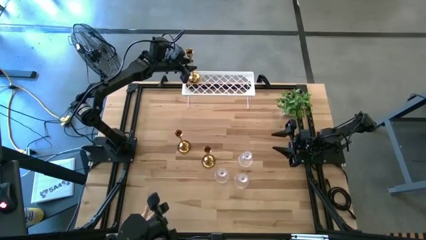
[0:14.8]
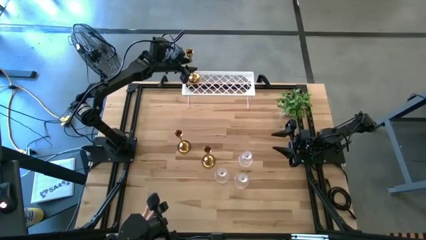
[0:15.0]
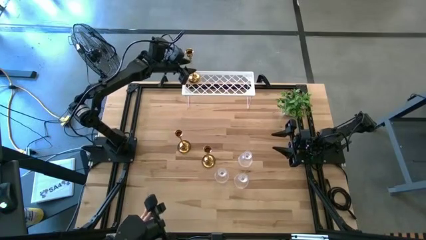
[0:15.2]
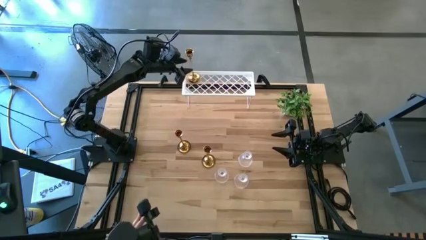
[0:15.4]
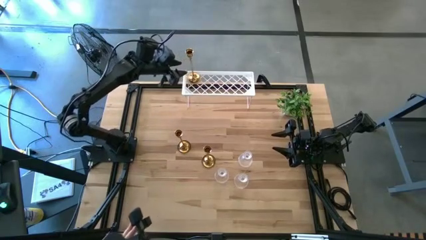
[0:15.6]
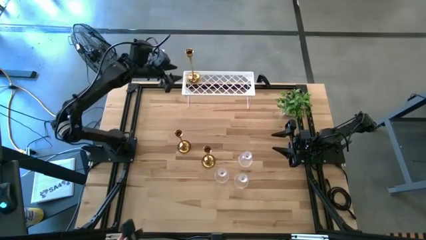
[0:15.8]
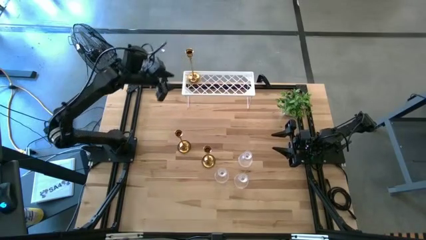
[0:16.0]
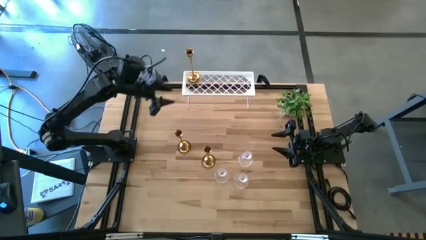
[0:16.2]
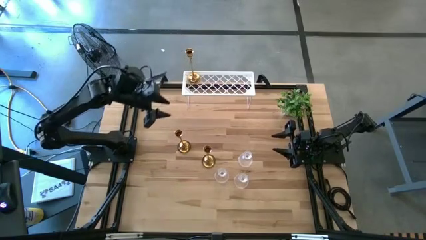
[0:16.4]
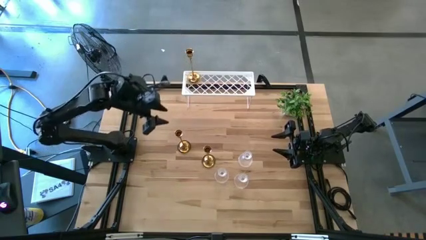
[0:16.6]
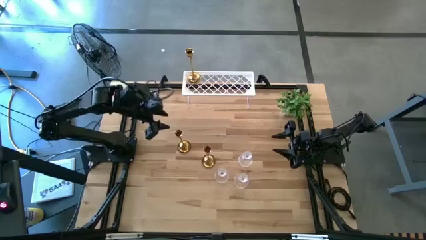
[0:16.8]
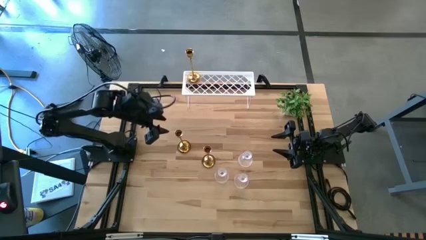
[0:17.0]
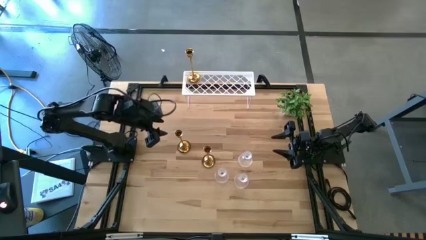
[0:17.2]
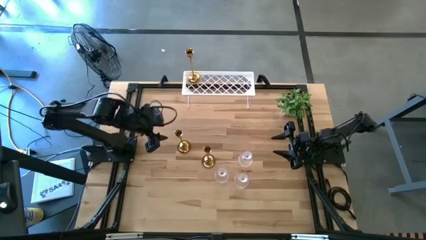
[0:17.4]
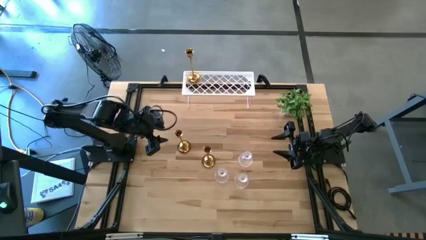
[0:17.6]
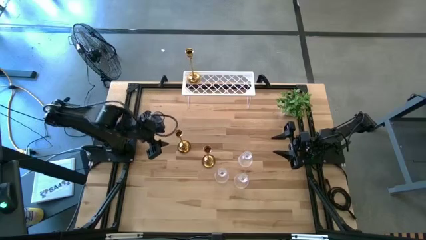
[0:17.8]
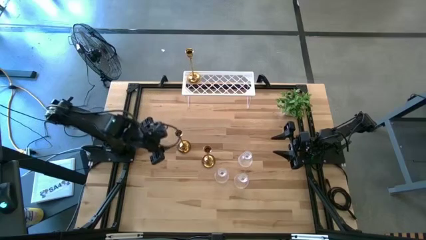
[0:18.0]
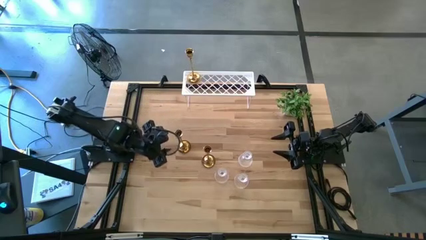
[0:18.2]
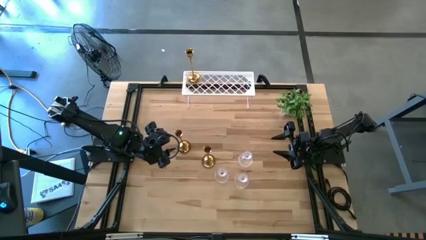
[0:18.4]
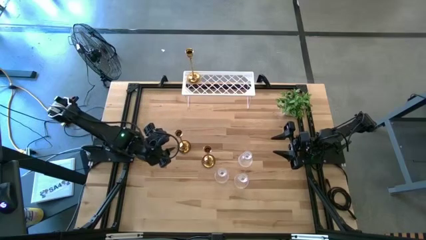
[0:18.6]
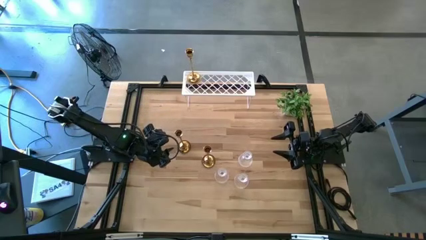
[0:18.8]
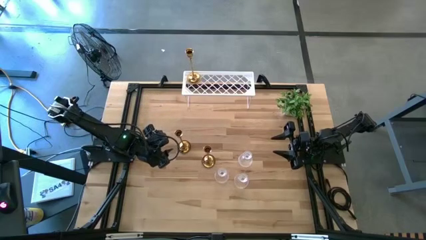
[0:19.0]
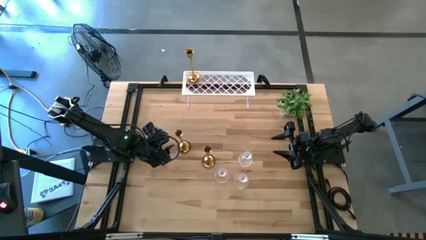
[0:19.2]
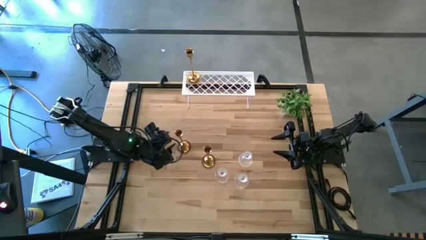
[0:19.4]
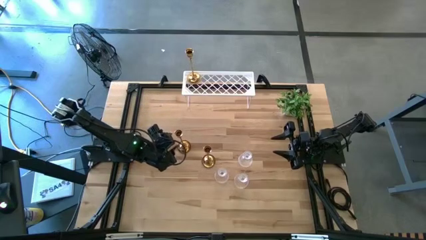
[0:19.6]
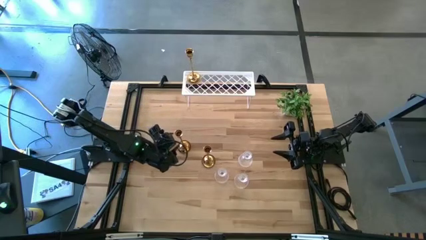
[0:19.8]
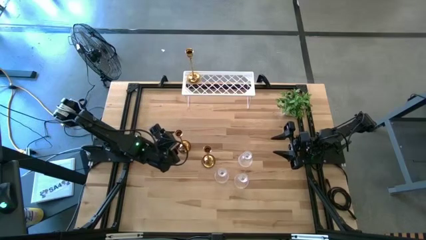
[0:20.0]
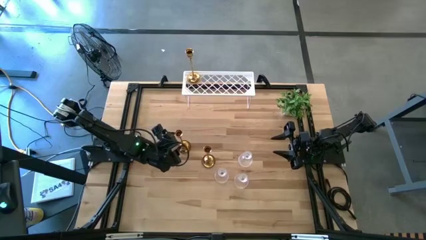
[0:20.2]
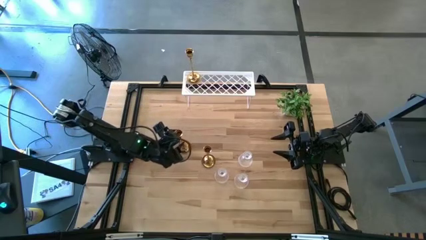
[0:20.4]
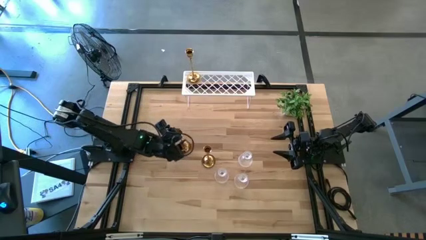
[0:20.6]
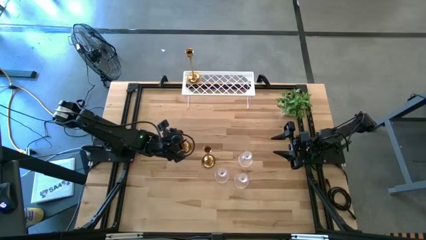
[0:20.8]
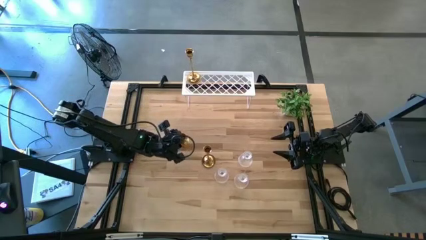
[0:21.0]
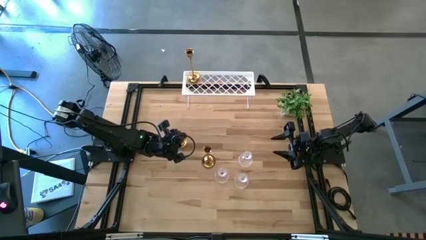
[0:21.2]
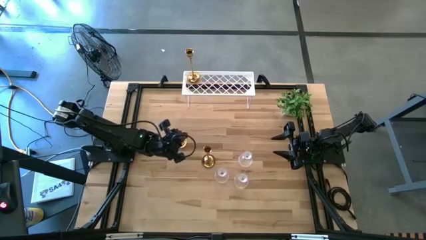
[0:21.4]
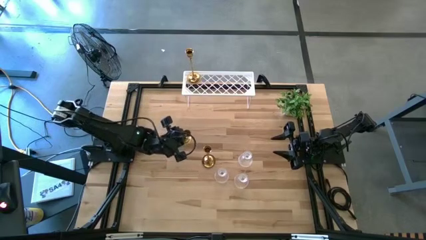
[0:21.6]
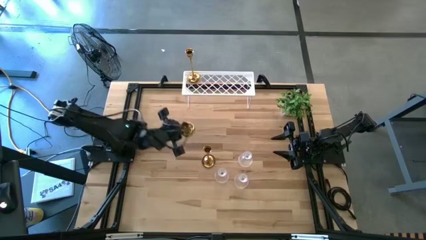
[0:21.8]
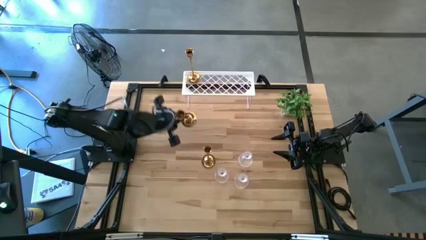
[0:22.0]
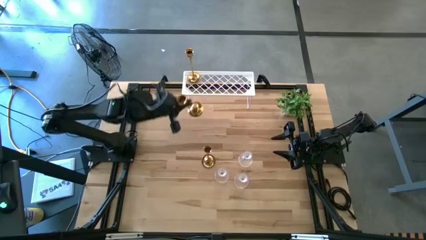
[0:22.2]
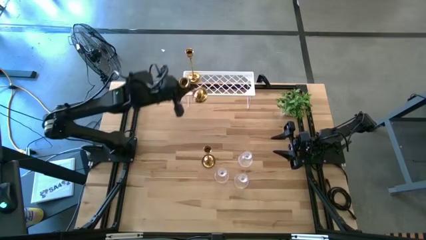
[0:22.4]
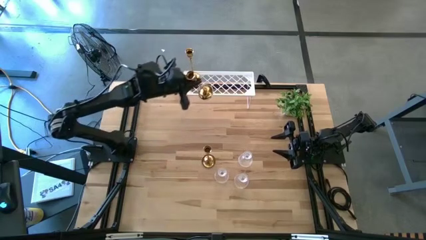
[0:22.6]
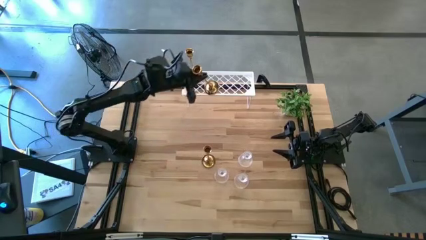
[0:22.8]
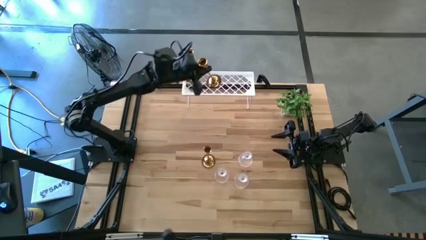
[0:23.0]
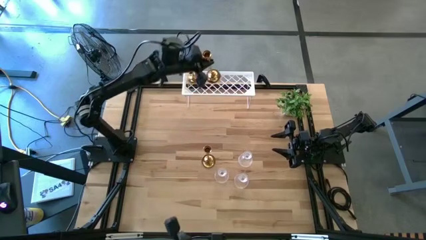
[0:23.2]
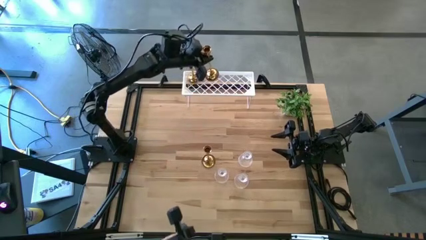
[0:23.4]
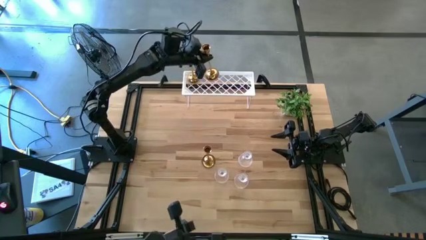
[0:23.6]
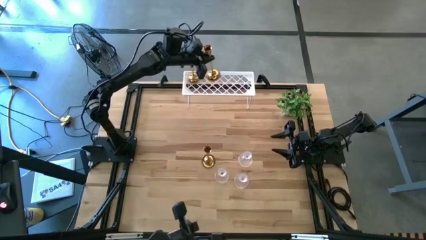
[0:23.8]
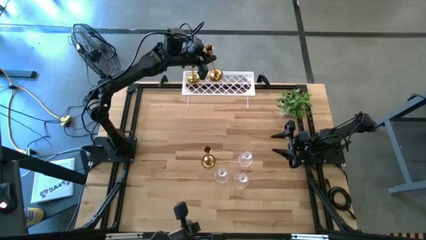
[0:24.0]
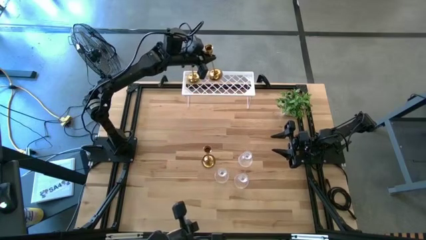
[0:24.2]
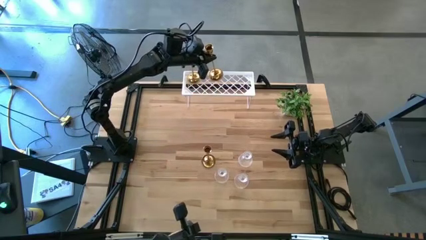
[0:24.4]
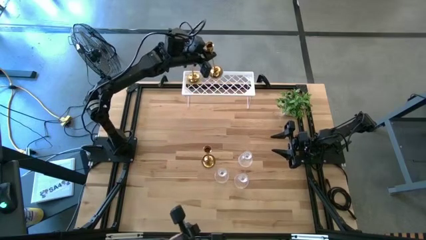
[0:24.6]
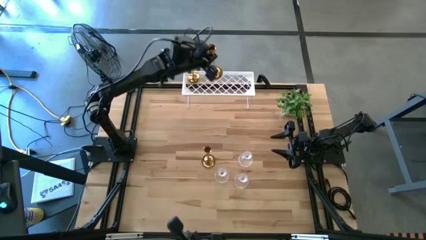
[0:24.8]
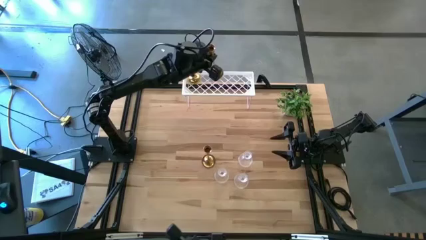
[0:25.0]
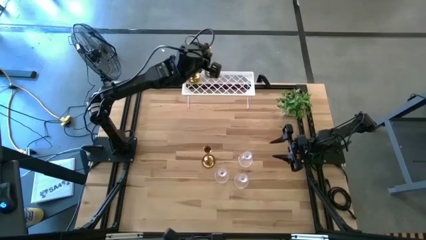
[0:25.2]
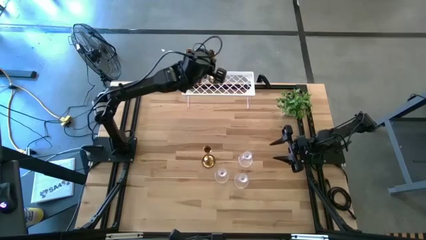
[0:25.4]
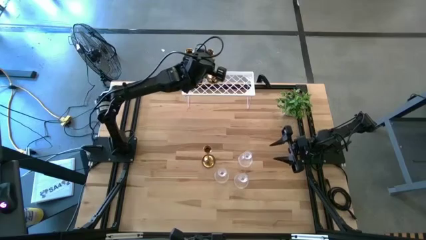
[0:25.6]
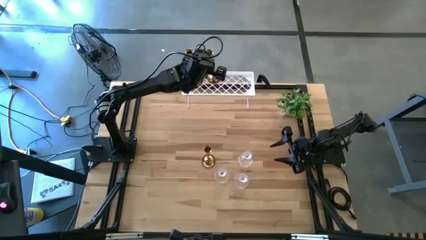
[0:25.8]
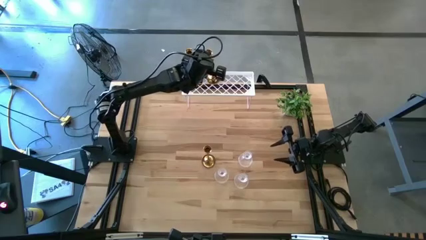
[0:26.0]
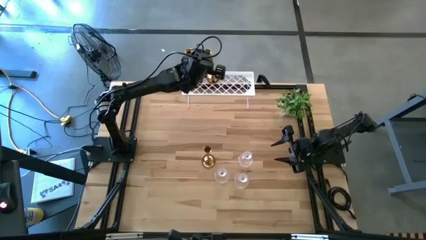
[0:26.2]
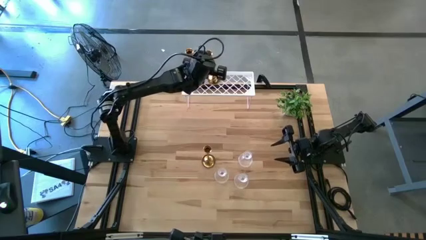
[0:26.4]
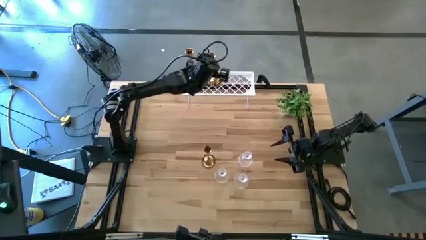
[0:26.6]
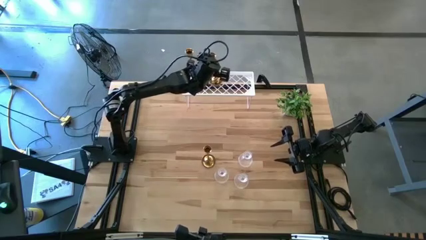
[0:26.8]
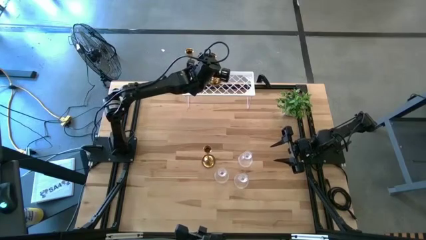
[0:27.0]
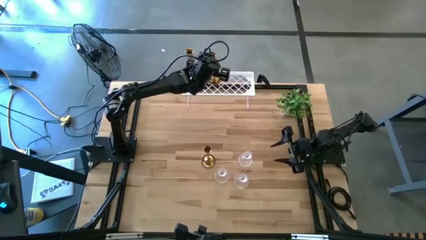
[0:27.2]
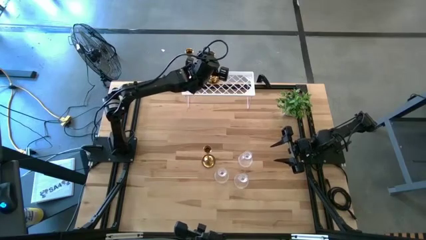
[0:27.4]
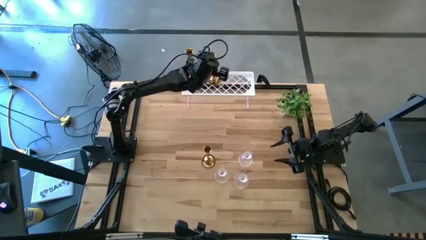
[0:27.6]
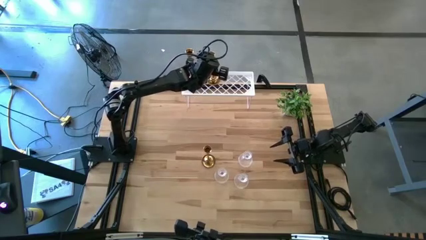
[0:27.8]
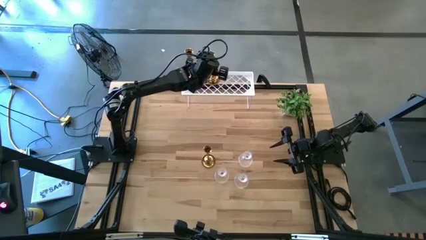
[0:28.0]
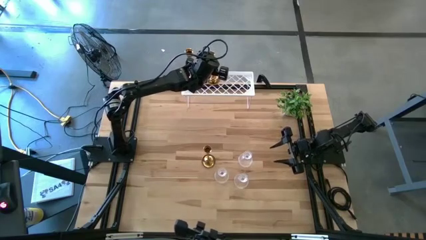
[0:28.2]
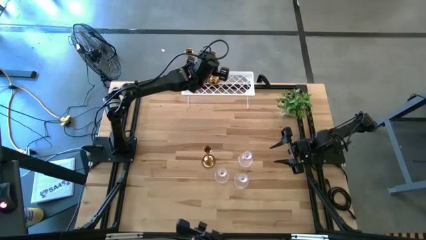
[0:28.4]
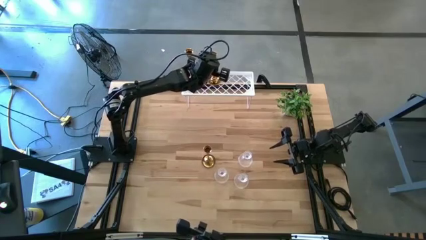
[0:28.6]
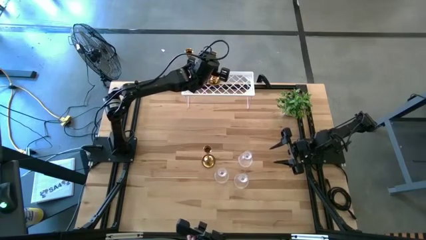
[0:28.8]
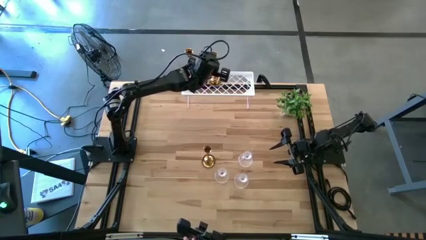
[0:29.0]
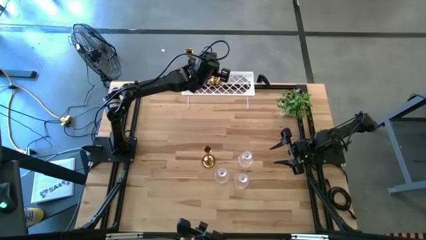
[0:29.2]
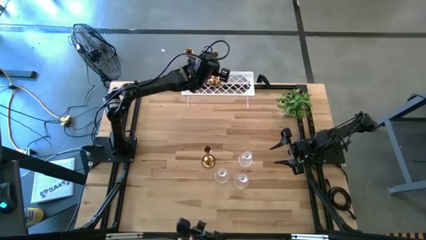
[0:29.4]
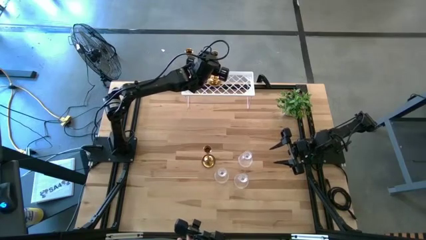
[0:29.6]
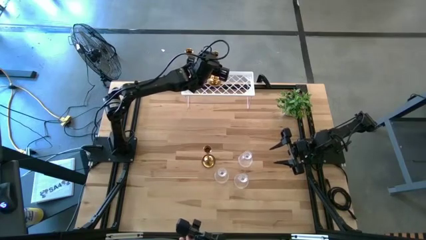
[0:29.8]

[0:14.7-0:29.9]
Task: Pick & Place candle stick holders
Put the left gold candle holder on the shelf
